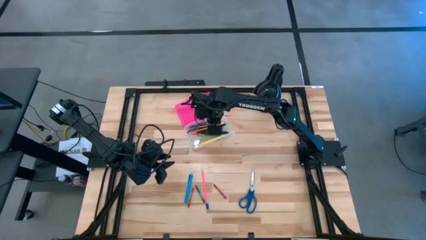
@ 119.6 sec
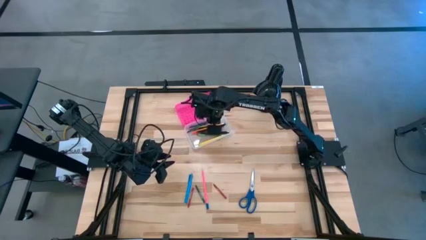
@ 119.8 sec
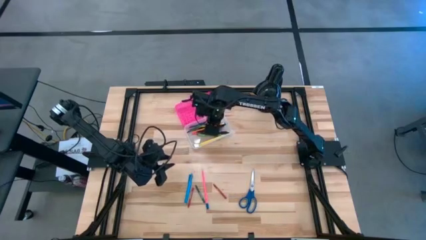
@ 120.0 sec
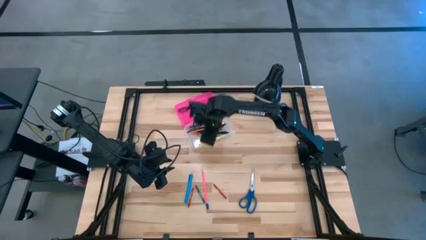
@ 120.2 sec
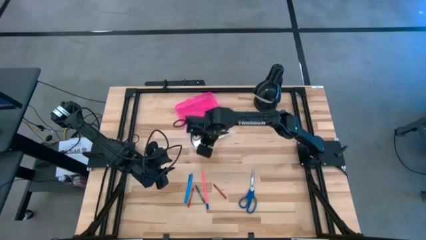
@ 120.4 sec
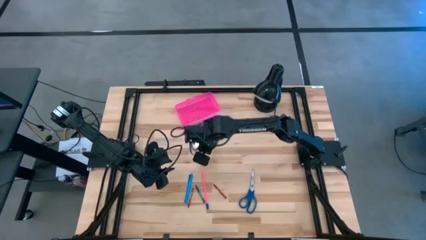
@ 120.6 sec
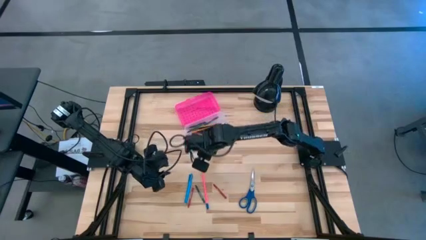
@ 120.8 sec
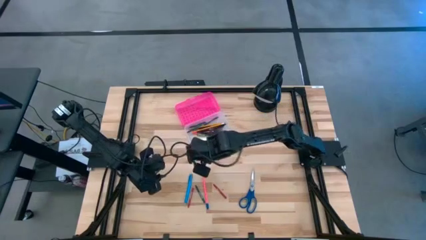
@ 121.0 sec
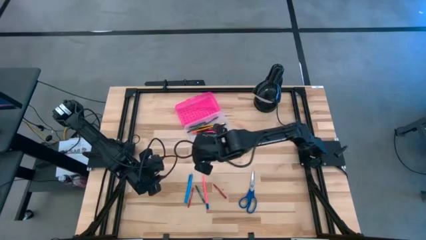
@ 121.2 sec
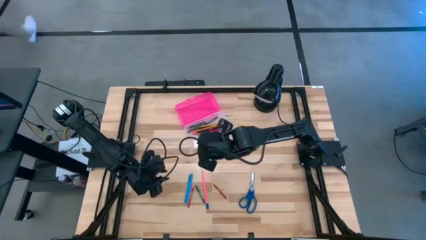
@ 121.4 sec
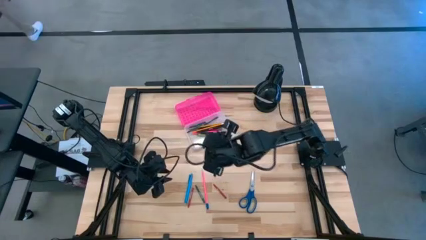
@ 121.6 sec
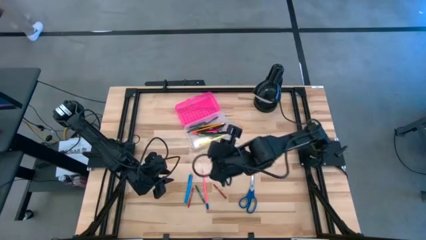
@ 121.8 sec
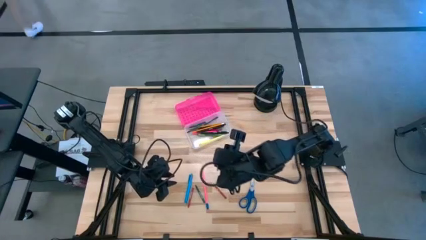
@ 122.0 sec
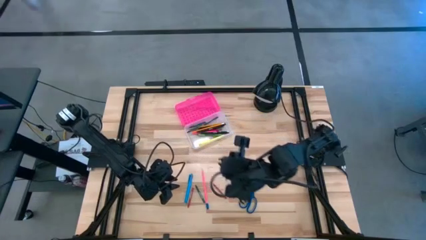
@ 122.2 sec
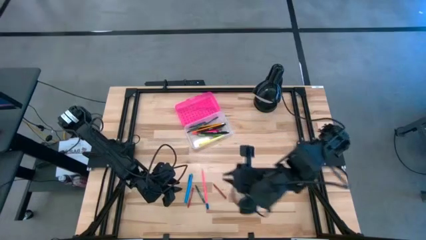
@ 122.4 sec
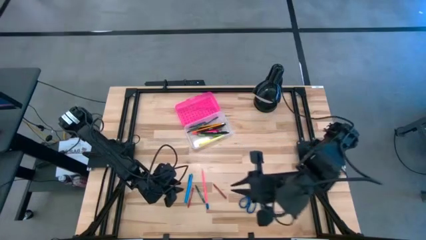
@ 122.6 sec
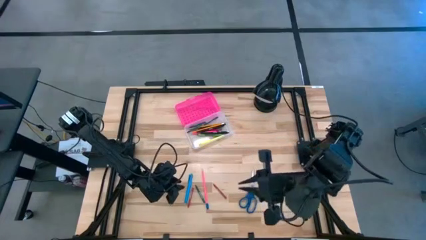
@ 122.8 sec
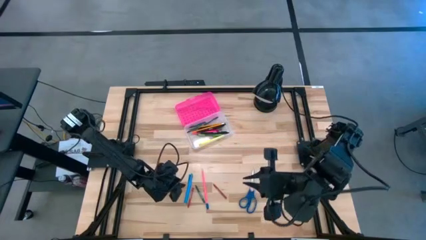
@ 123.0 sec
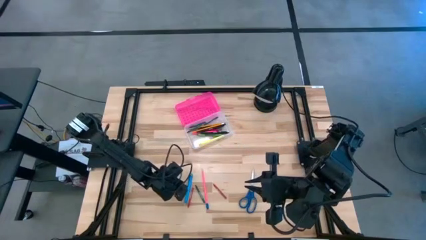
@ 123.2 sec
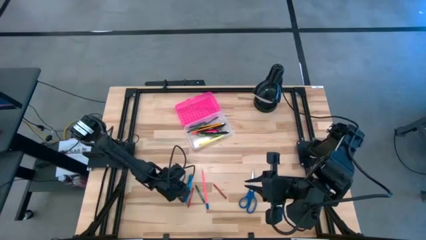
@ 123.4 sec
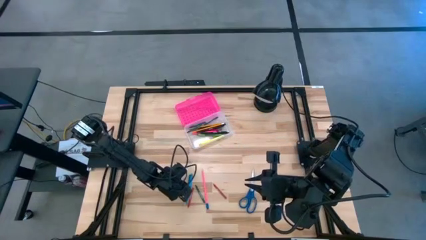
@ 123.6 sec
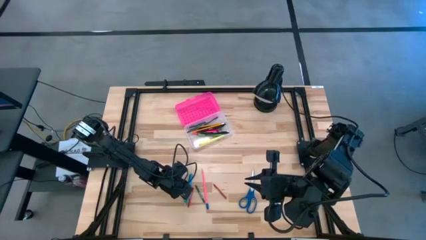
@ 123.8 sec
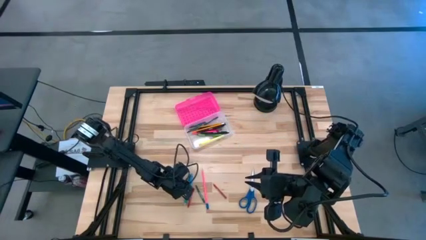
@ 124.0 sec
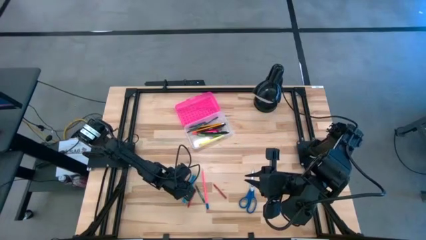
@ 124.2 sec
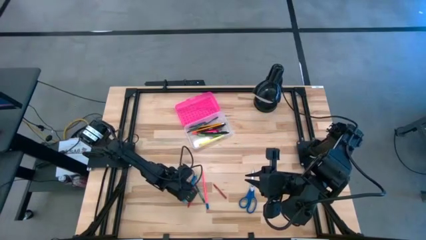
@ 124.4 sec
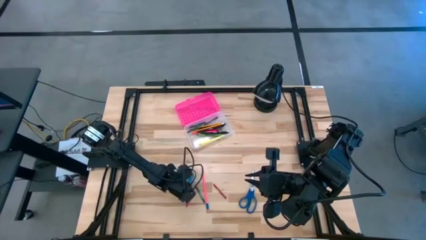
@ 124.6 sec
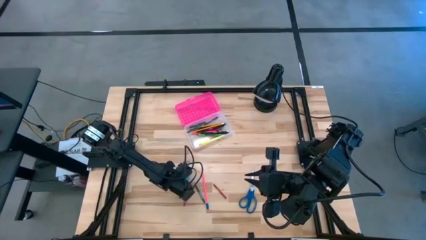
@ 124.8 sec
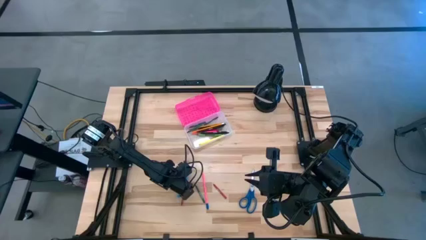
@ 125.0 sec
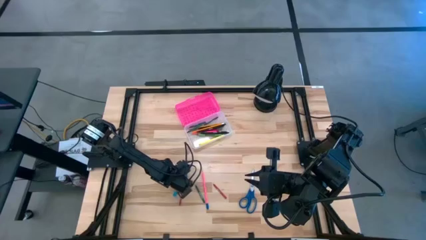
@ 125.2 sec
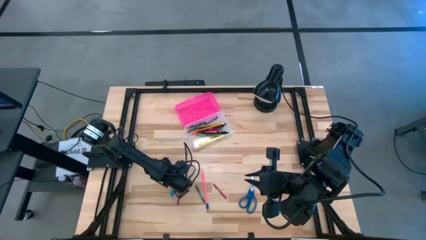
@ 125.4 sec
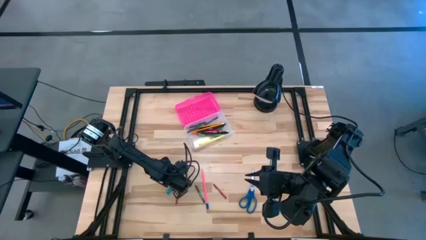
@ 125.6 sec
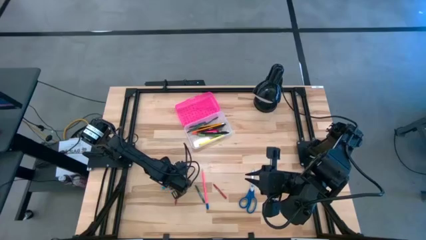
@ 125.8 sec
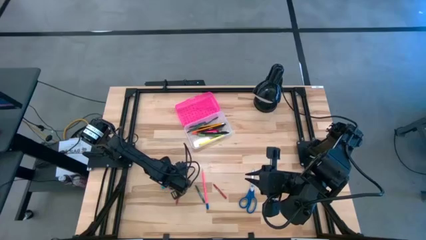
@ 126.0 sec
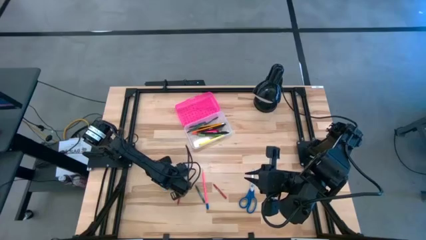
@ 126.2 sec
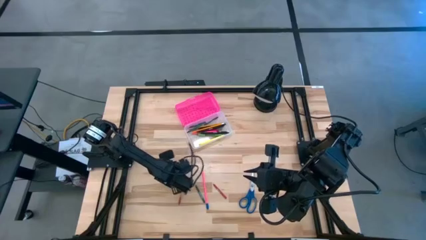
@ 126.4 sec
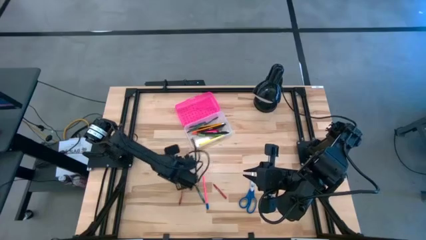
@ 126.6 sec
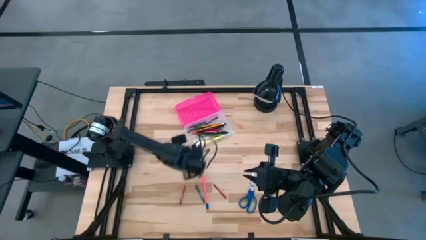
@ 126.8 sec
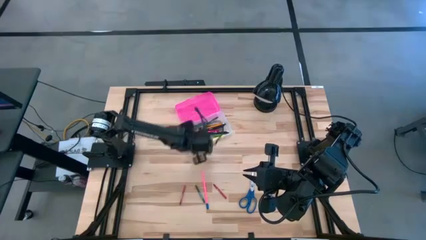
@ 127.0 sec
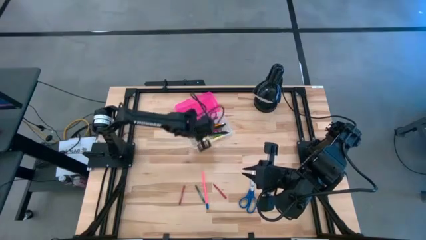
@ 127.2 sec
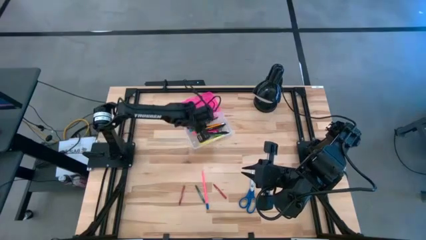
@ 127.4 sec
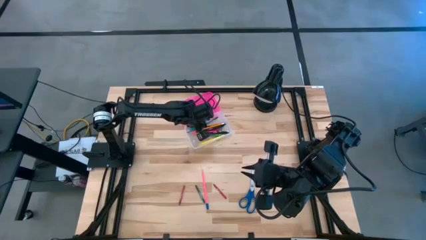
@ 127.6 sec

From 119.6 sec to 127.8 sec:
Task: Pick & place school supplies into a supply box
Put the blue pen into the pink supply box

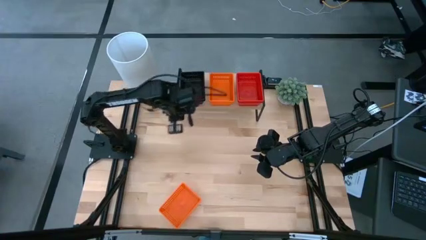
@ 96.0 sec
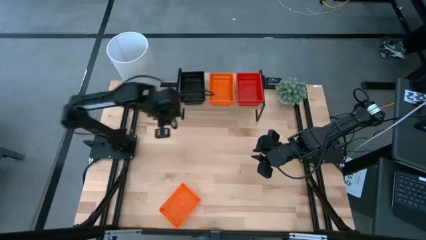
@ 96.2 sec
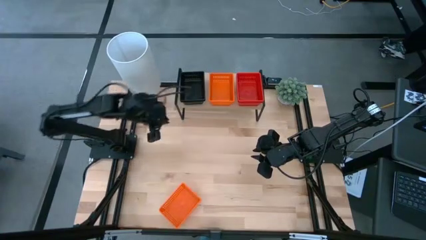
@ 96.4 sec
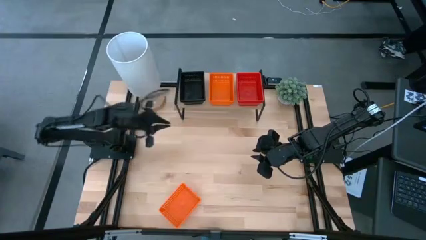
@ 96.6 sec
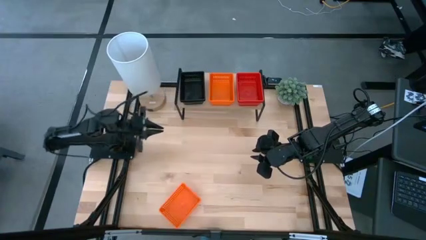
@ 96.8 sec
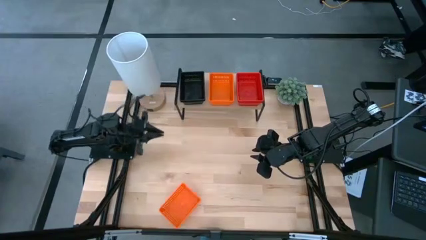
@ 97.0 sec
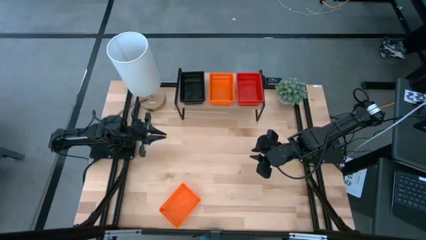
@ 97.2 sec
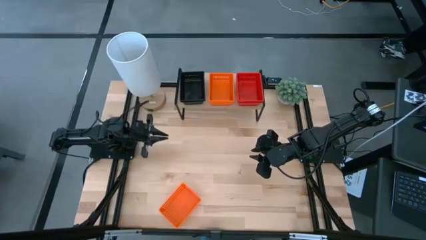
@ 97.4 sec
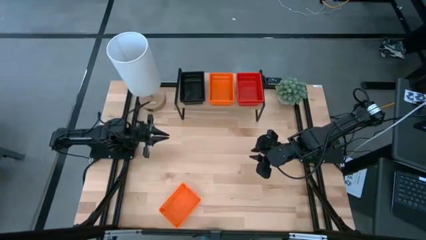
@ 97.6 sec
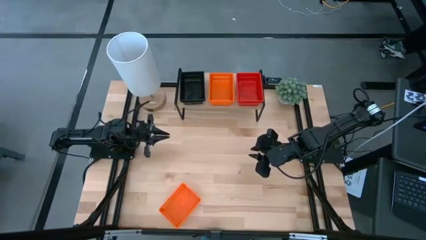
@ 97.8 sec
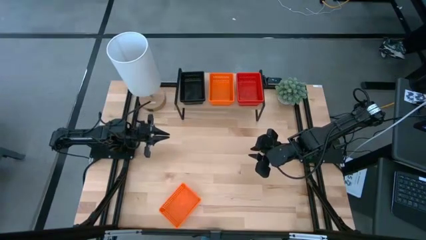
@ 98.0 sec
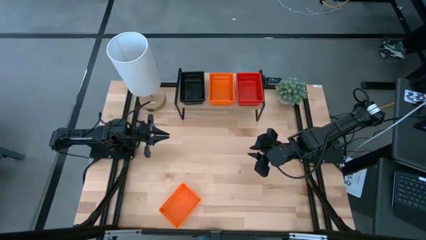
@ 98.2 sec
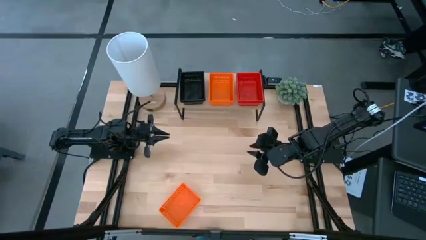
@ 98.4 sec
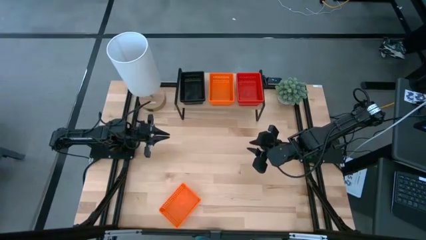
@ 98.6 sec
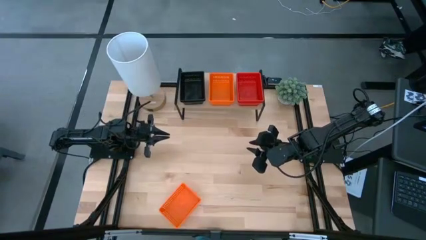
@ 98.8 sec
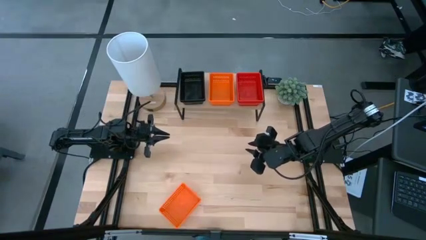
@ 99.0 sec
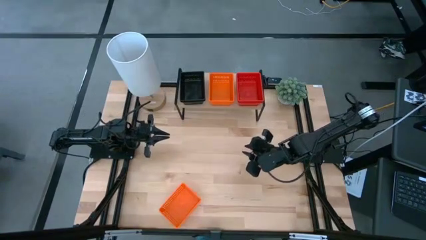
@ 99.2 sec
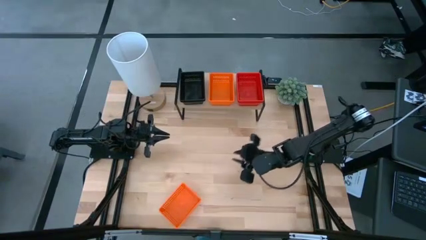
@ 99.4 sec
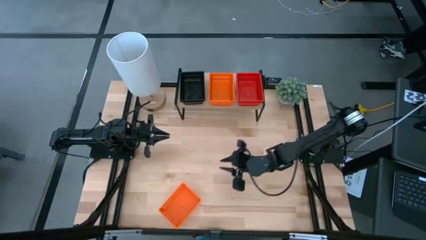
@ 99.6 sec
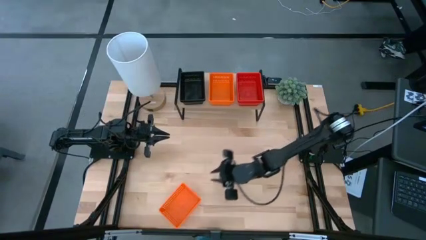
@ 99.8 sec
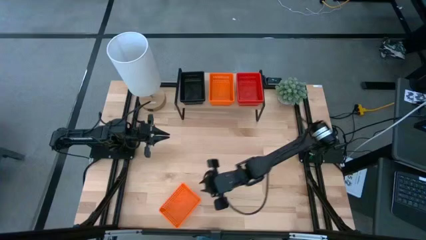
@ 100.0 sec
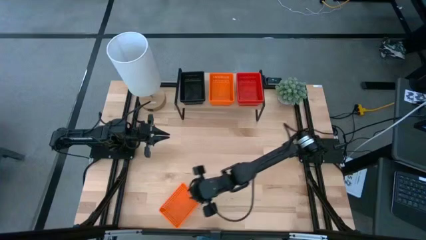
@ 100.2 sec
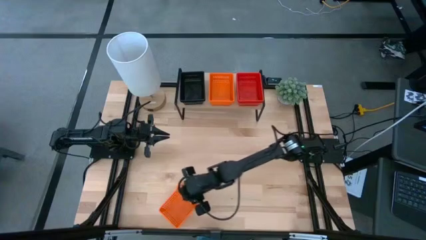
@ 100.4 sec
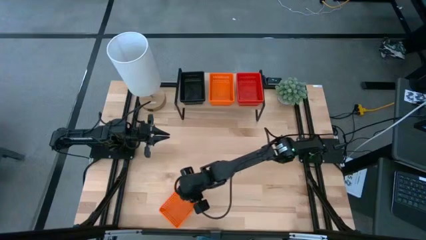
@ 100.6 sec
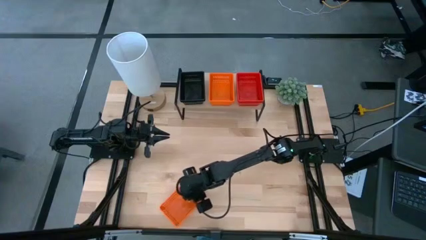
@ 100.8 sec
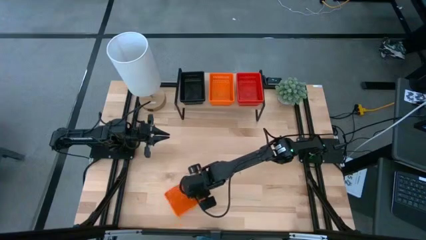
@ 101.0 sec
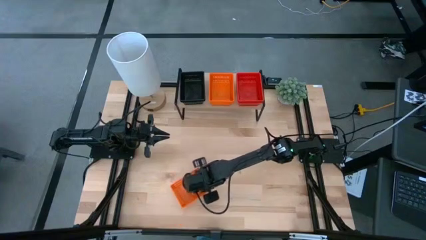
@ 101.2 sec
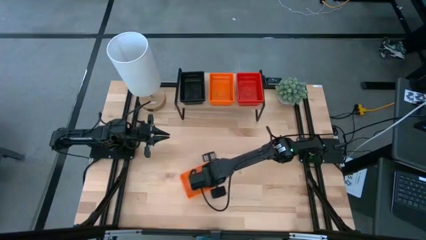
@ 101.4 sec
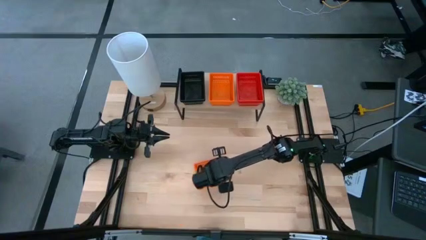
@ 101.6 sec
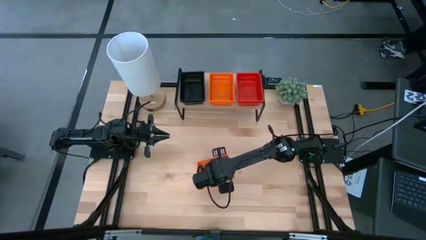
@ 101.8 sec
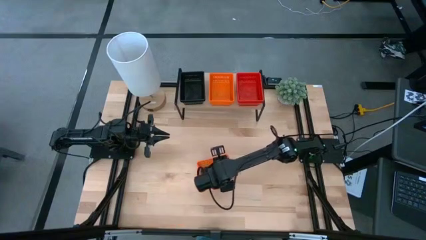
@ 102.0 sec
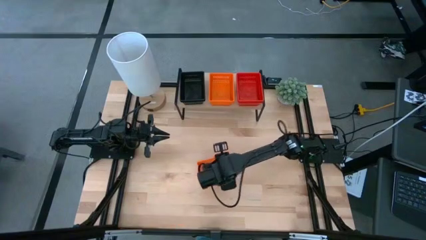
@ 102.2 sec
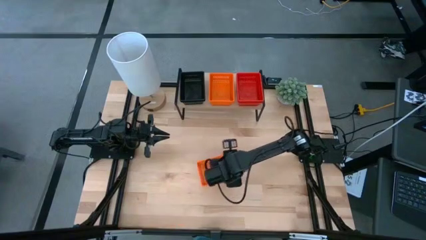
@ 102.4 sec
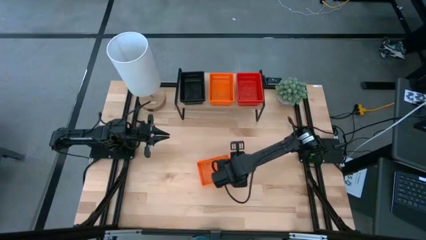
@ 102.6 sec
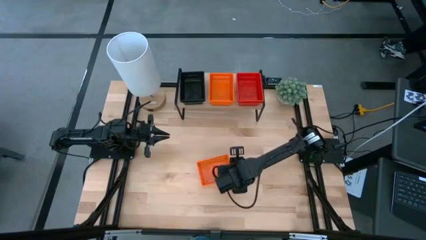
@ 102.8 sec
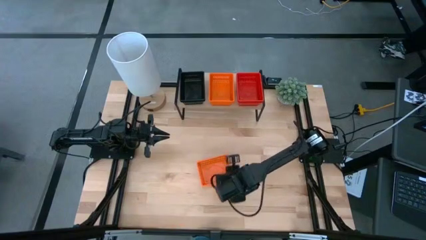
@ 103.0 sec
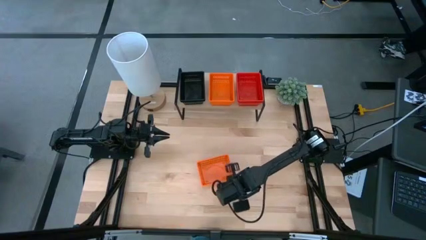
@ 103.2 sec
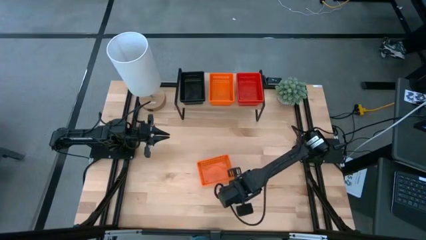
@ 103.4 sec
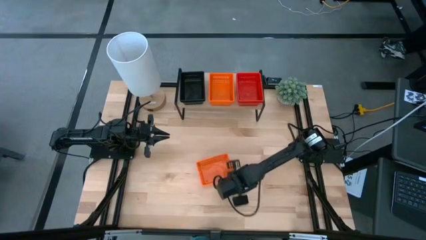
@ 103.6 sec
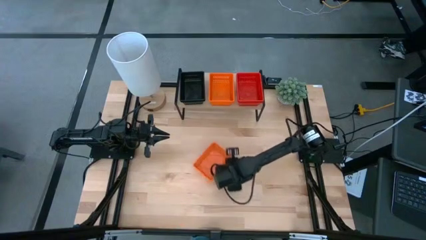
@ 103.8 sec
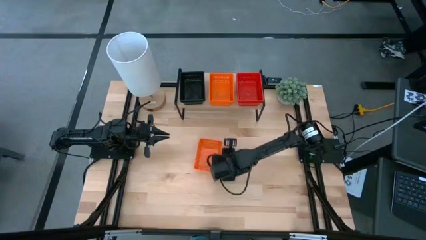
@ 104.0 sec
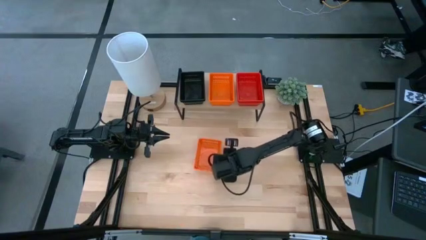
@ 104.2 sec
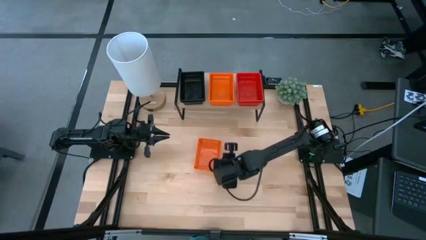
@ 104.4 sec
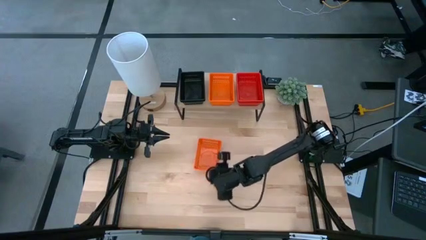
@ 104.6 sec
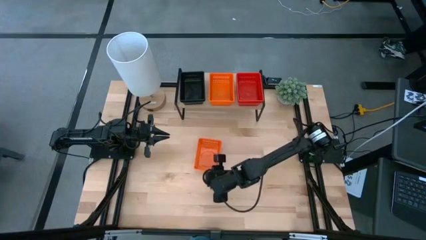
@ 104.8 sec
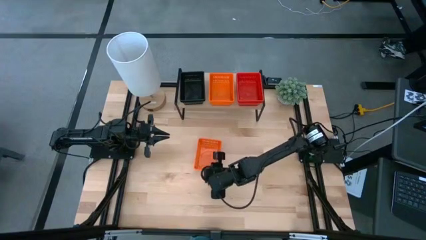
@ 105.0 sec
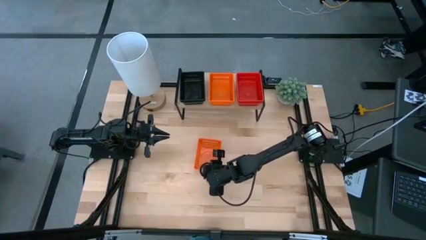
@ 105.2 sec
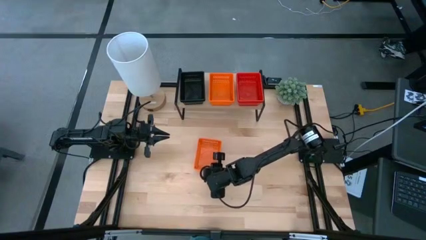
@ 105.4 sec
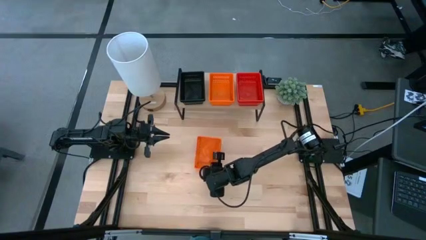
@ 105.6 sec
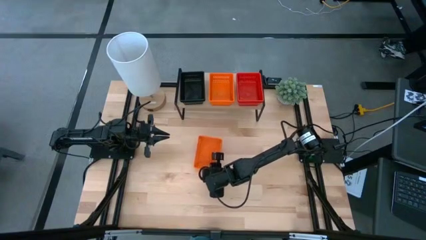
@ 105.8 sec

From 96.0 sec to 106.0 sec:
Task: Stack baskets on shelf by color
Stack the orange basket on top of the stacked orange baskets on the shelf
